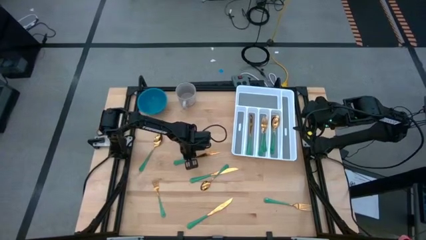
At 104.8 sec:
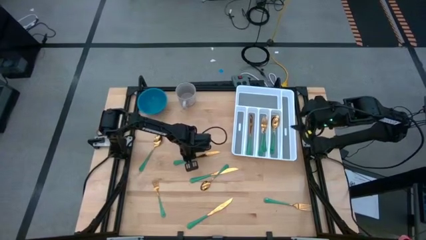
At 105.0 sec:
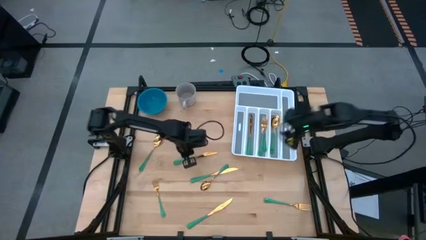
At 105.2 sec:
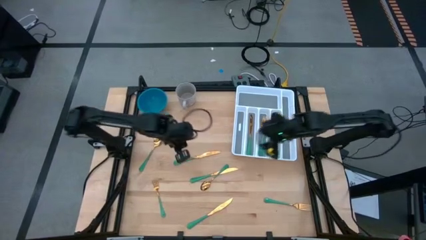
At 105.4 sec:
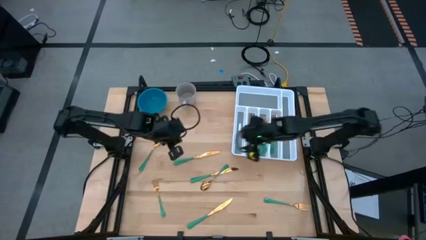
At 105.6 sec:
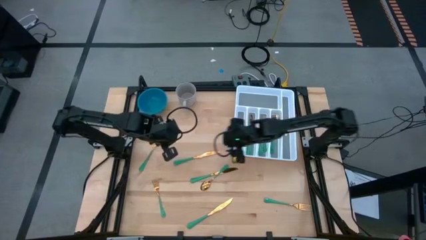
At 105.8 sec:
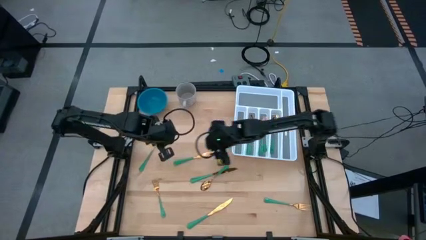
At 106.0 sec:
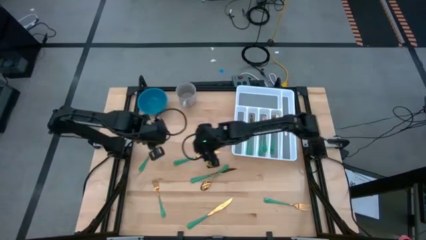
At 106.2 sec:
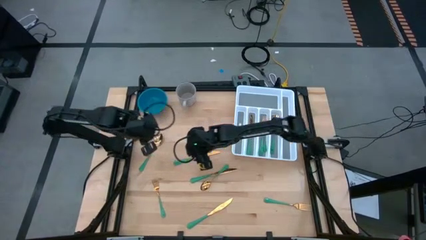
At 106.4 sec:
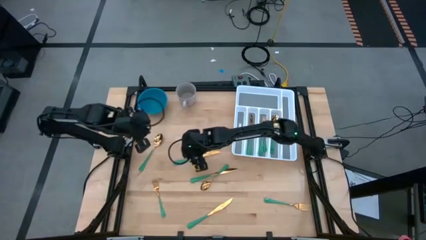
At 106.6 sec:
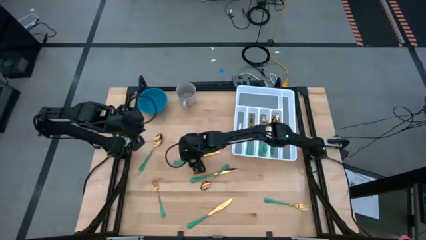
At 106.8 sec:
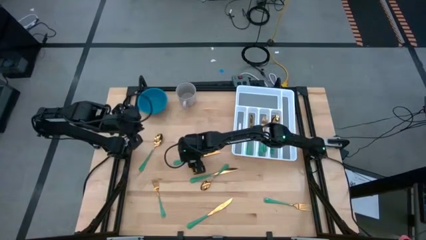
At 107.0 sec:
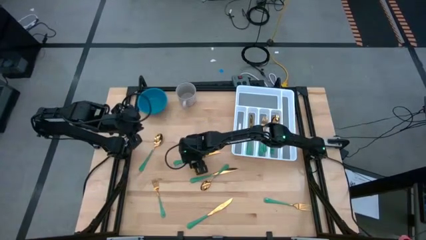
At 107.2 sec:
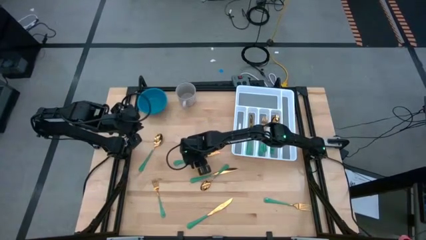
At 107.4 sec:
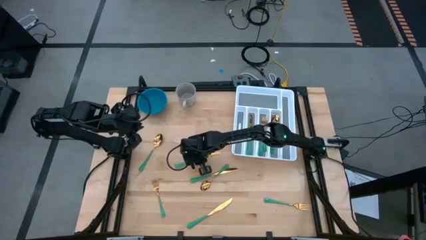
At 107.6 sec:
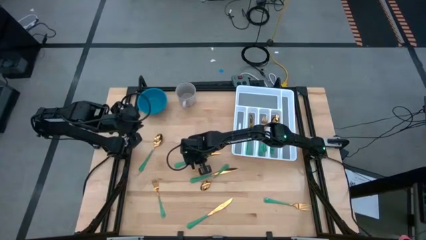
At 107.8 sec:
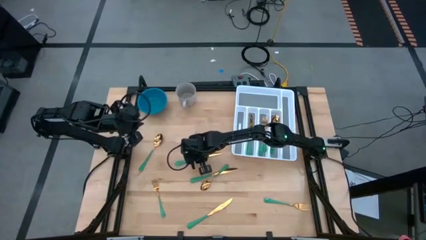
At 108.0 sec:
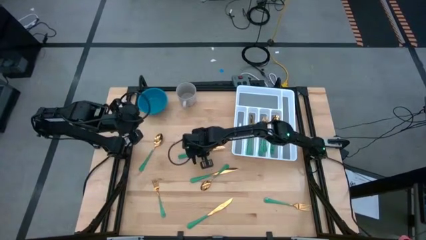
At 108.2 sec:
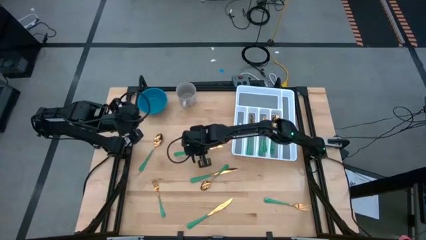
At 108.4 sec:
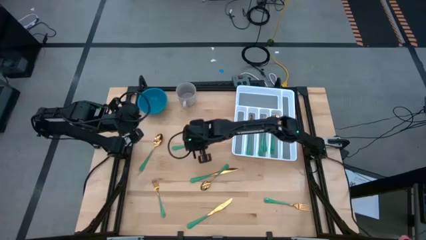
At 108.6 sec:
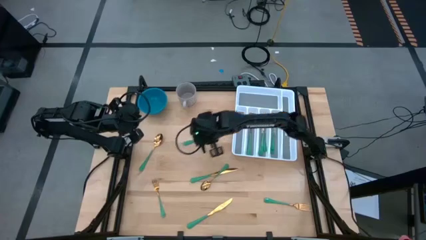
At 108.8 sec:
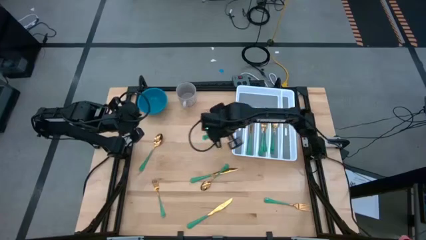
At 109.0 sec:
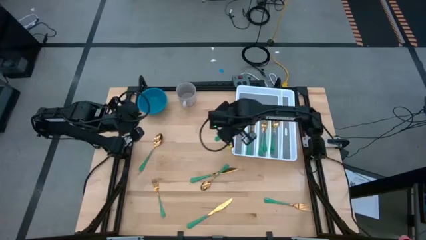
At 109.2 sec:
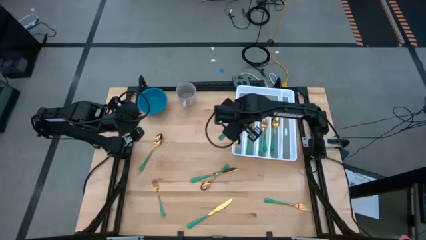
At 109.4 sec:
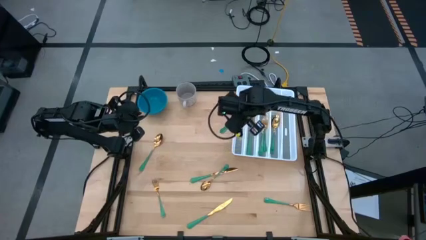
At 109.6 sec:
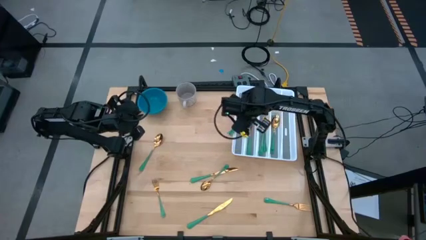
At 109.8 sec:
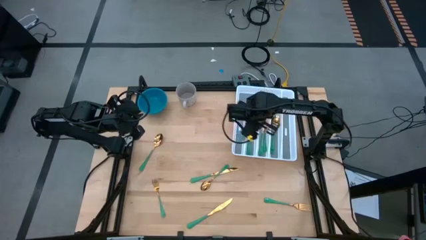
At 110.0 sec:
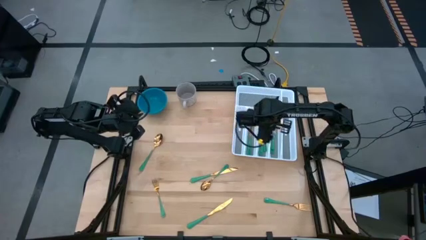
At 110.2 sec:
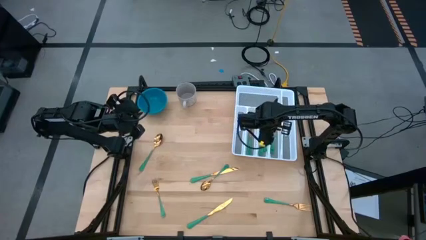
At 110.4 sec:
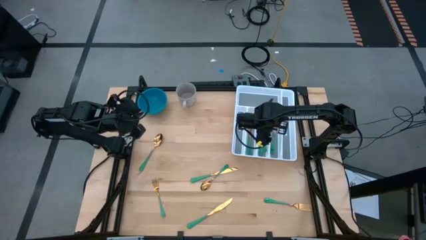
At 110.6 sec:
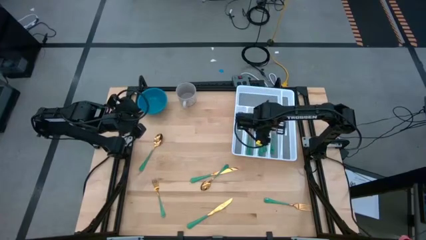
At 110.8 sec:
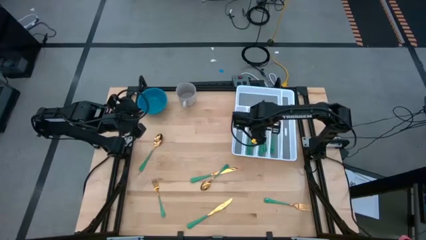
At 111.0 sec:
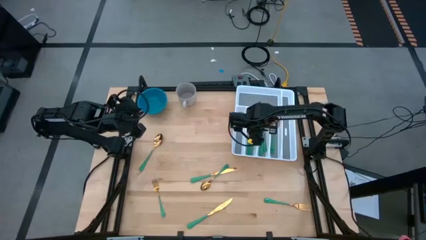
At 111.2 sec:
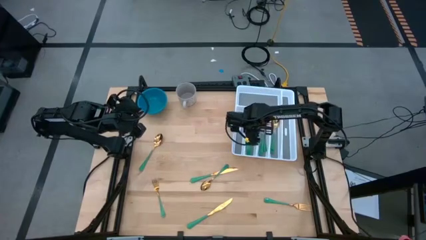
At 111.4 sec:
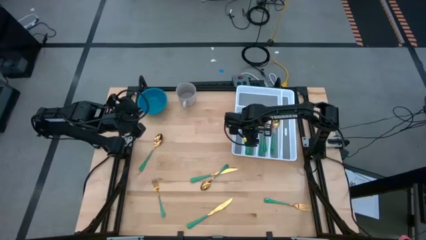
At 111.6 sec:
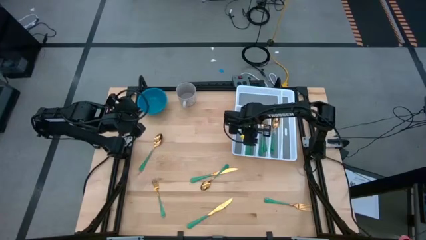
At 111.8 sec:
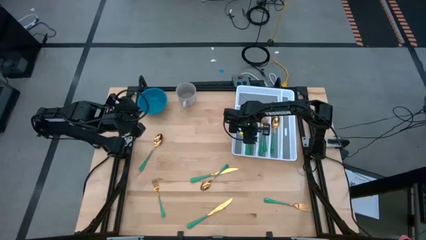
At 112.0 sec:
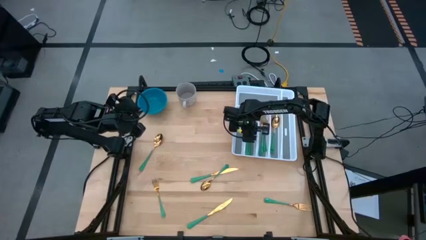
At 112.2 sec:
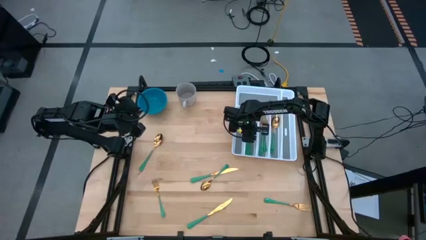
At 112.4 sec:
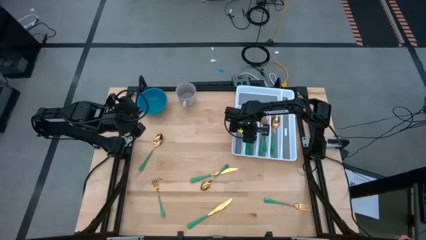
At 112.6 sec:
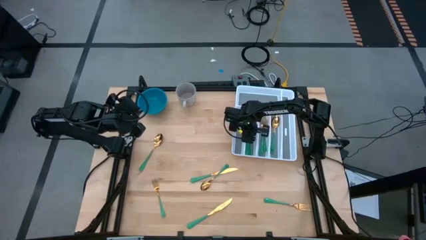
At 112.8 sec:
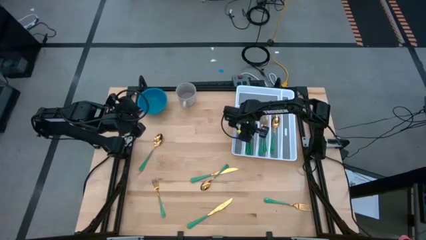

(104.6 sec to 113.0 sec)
Task: Sort silverware
Put the green table knife into the white cutlery tray

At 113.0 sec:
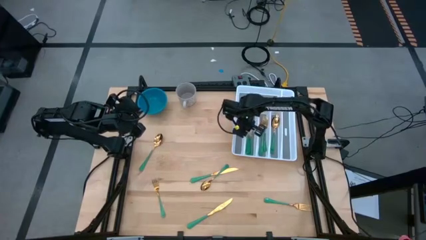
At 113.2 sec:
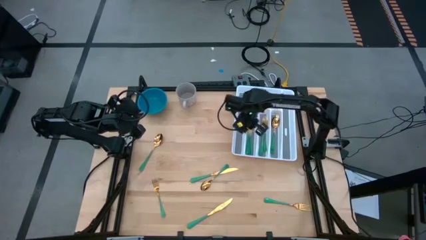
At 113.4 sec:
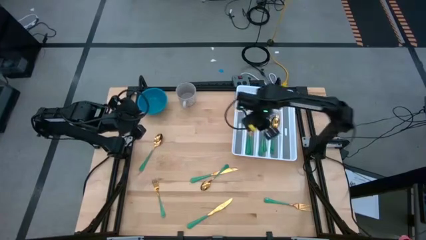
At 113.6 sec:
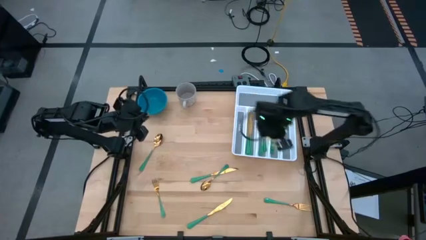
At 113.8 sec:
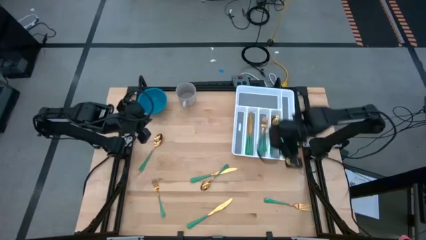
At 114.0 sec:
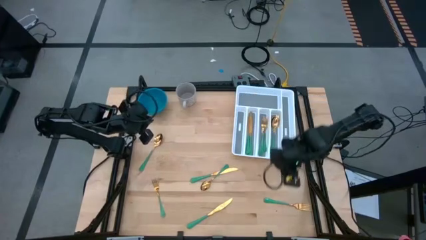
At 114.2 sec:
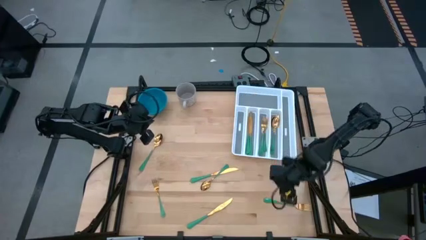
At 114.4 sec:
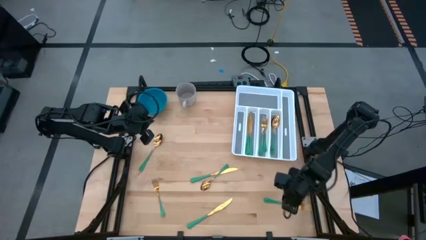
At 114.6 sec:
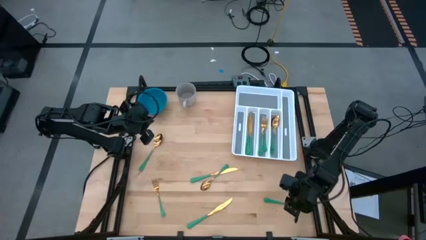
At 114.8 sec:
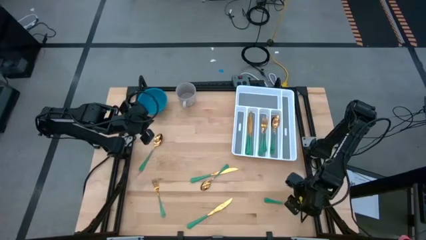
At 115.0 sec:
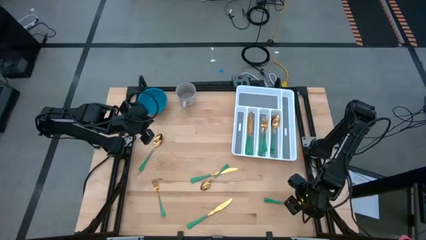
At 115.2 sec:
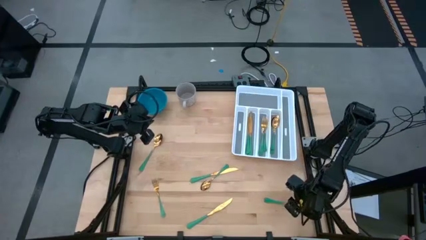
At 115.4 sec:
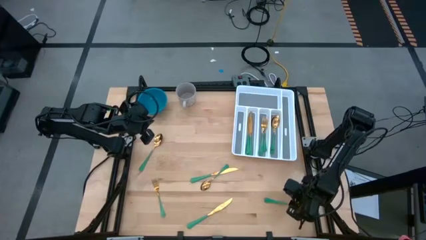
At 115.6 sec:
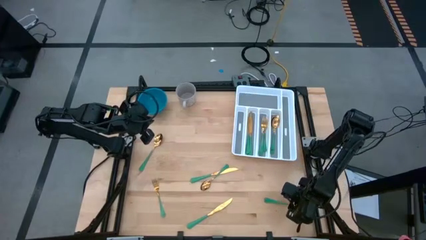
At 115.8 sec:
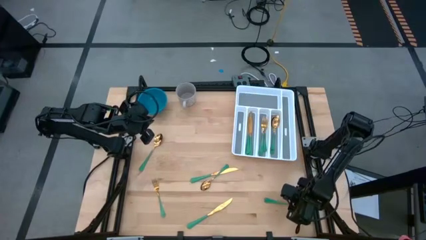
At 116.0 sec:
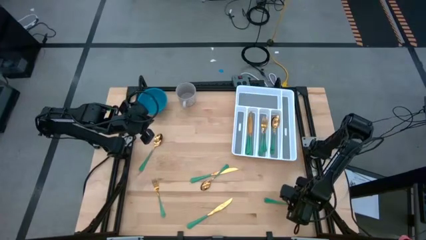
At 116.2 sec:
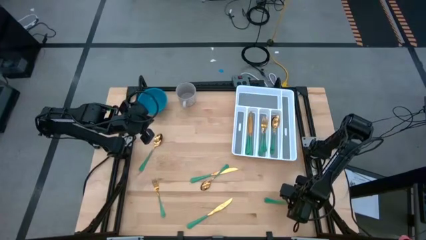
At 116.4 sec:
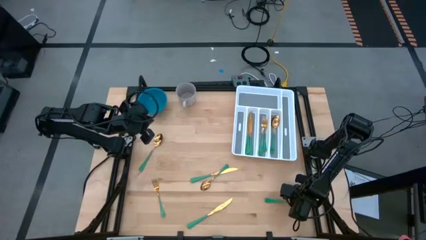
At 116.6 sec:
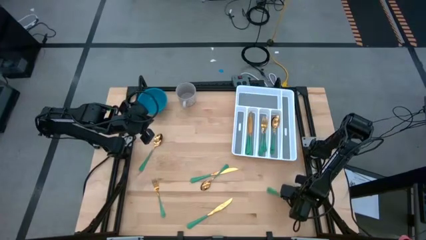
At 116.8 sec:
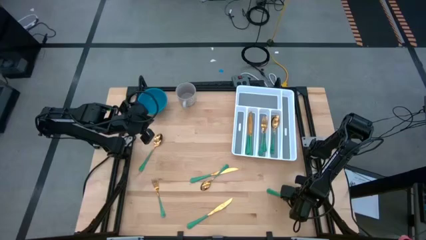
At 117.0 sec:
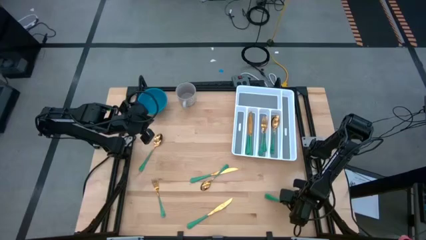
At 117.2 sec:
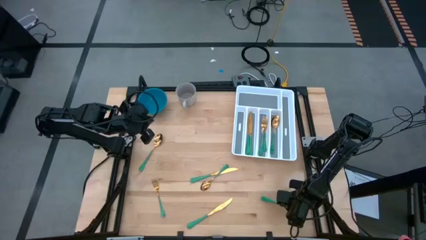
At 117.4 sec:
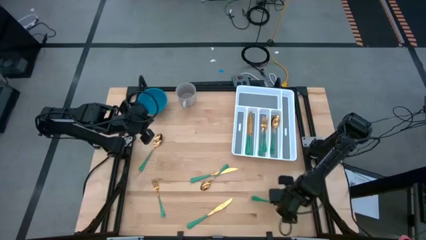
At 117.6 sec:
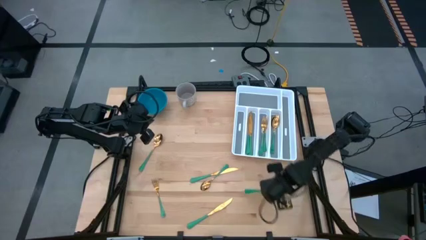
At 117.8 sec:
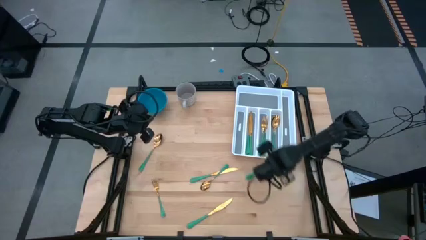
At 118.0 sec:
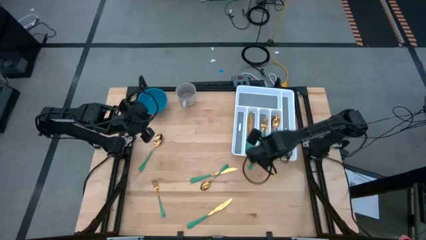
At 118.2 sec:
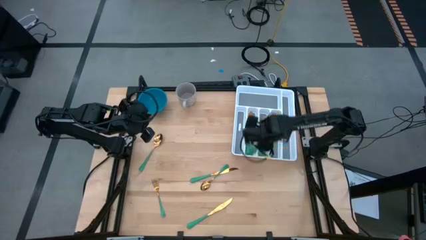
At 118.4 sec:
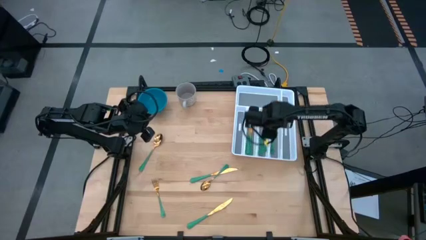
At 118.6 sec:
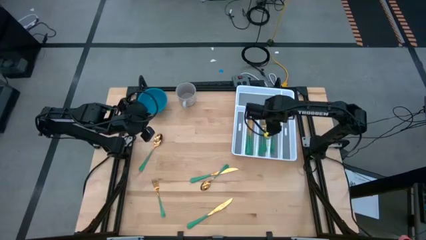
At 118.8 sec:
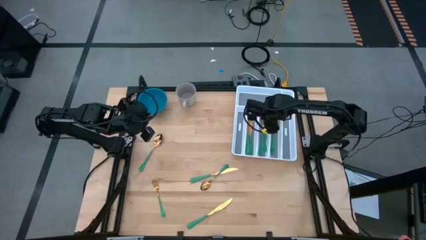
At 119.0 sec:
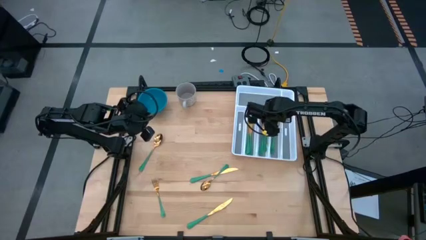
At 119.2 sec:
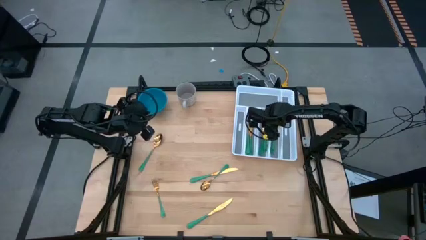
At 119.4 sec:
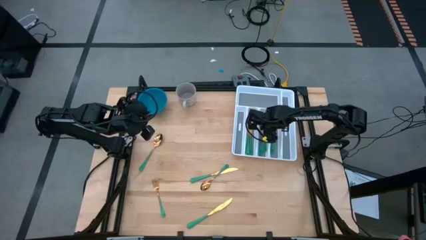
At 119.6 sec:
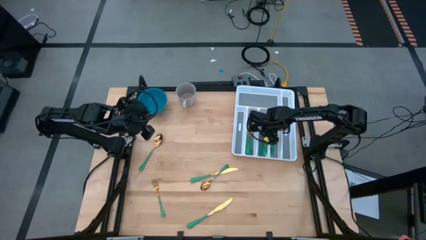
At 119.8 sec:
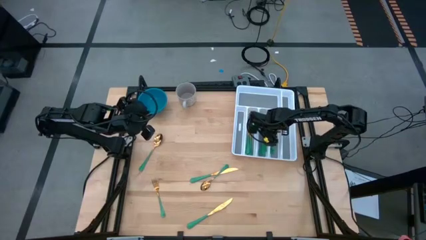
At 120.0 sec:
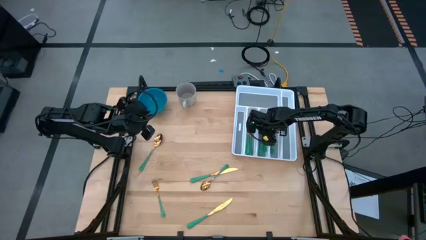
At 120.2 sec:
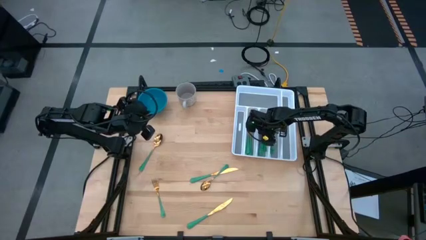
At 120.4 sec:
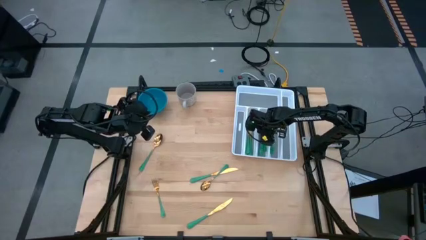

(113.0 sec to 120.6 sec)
Put the green fork into the white cutlery tray
